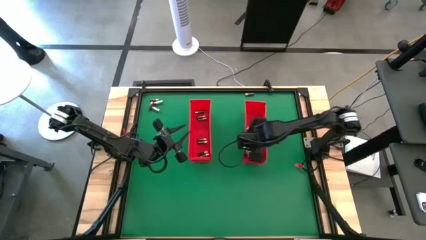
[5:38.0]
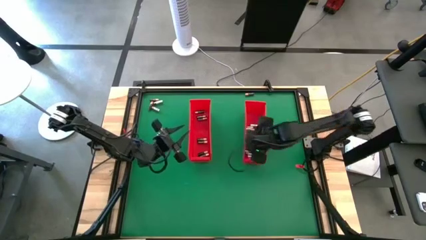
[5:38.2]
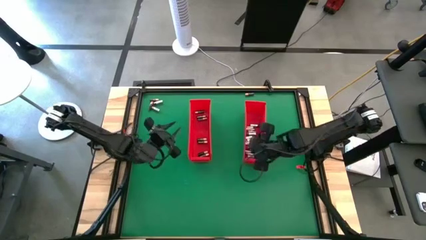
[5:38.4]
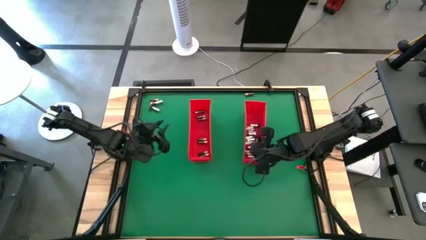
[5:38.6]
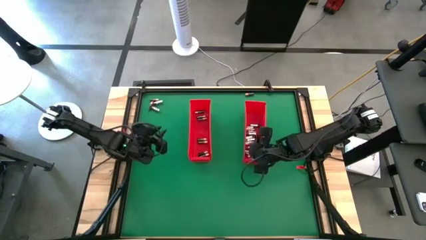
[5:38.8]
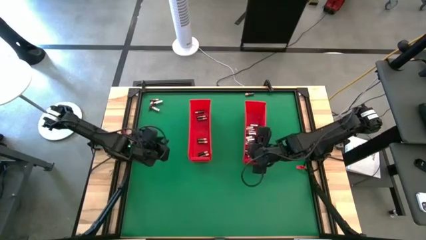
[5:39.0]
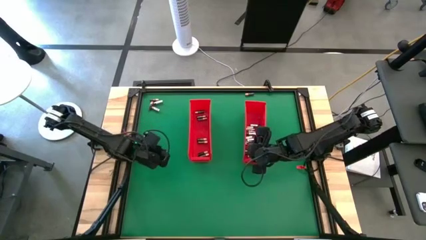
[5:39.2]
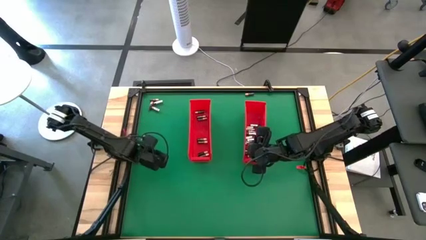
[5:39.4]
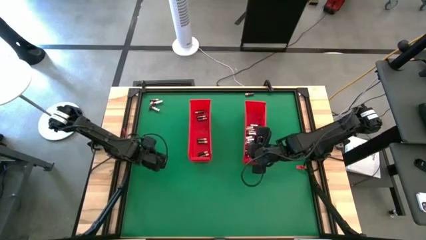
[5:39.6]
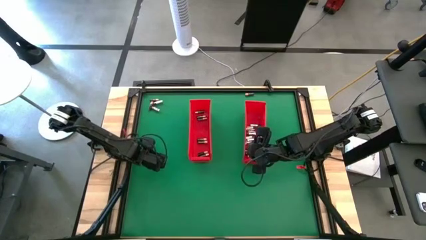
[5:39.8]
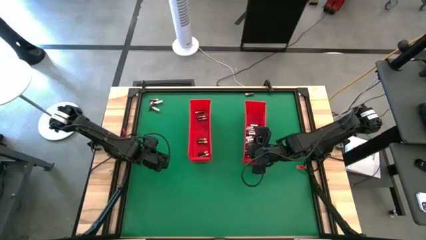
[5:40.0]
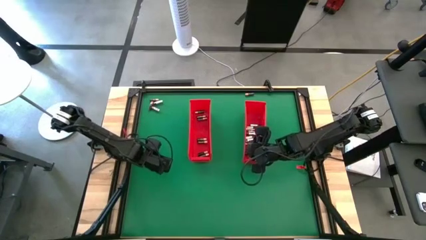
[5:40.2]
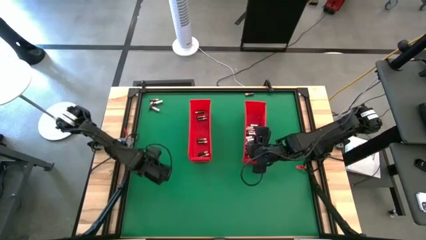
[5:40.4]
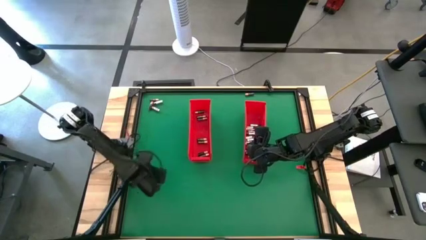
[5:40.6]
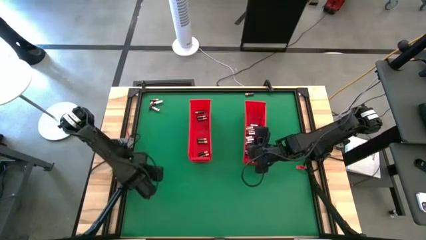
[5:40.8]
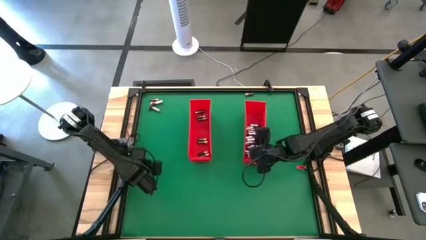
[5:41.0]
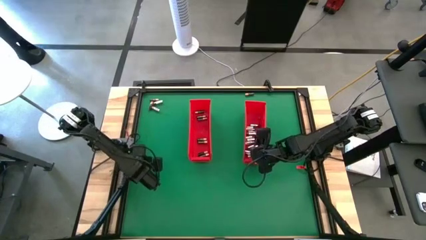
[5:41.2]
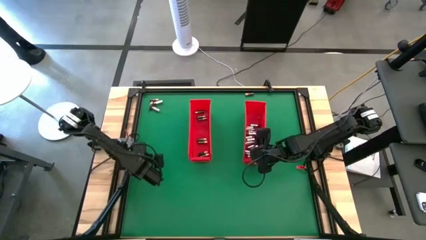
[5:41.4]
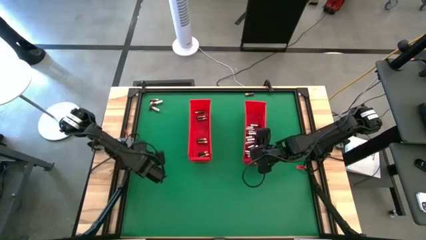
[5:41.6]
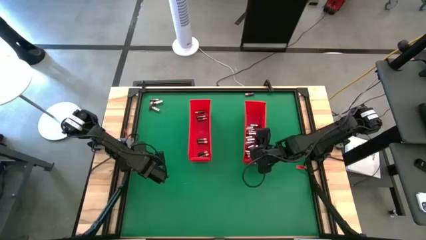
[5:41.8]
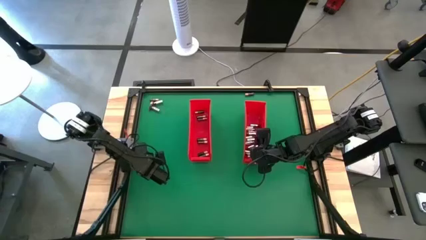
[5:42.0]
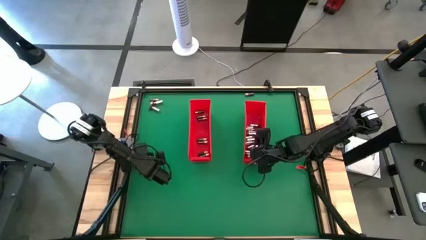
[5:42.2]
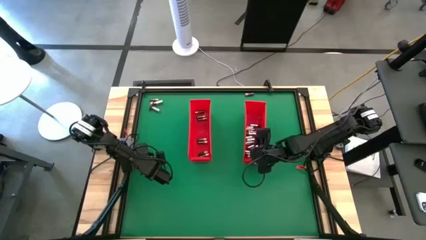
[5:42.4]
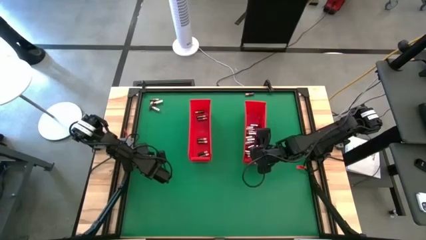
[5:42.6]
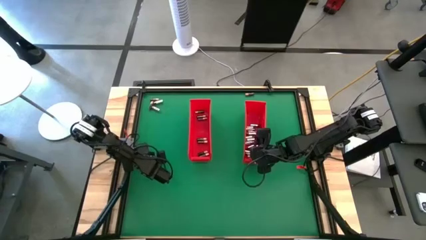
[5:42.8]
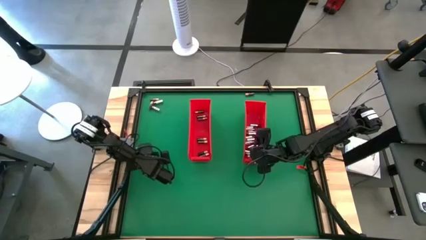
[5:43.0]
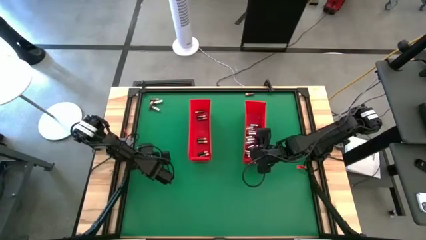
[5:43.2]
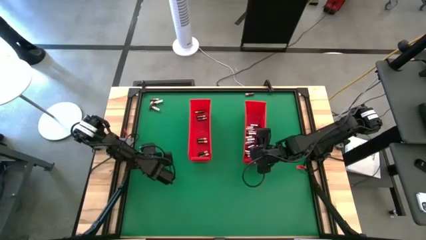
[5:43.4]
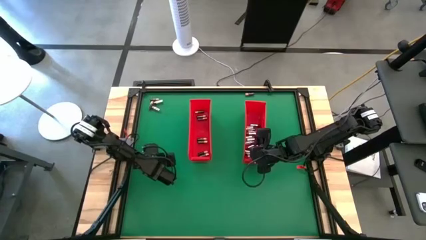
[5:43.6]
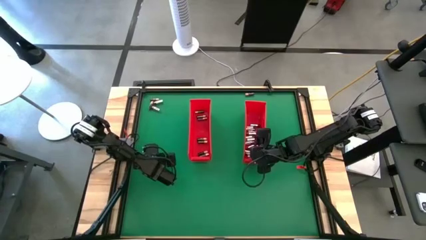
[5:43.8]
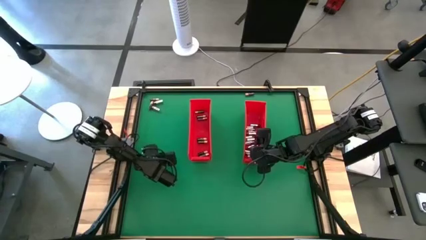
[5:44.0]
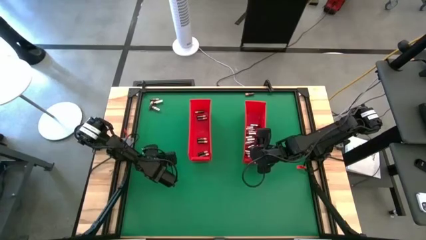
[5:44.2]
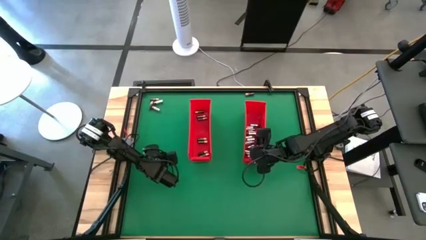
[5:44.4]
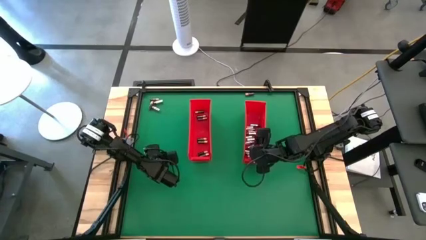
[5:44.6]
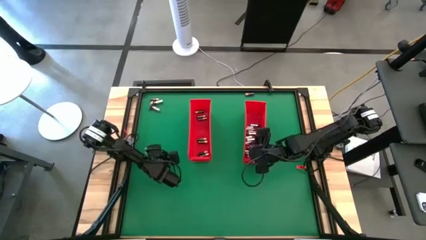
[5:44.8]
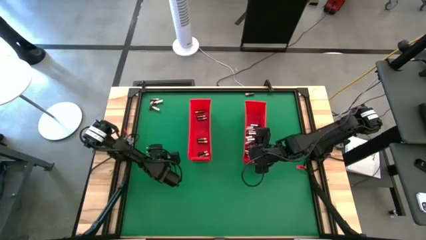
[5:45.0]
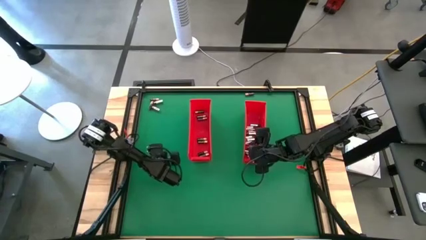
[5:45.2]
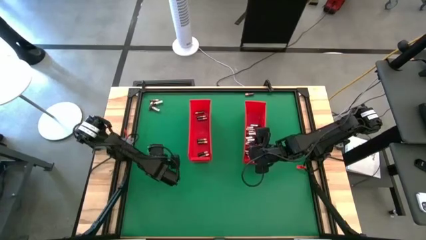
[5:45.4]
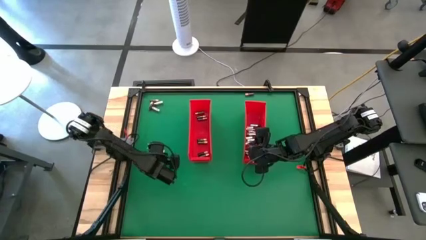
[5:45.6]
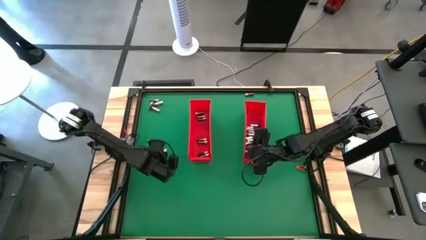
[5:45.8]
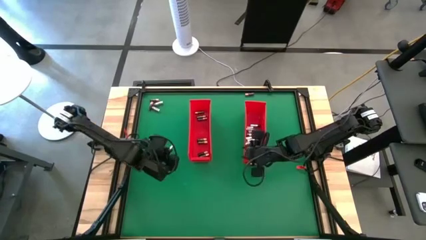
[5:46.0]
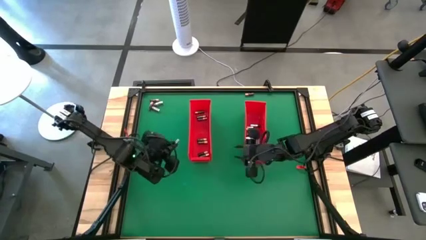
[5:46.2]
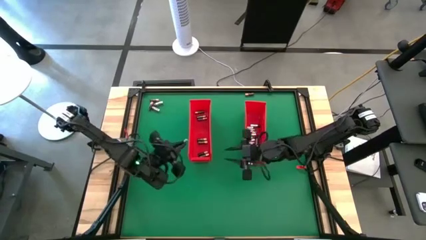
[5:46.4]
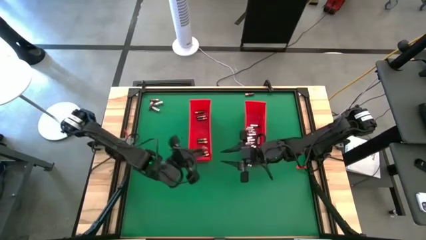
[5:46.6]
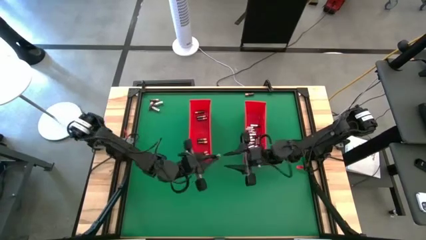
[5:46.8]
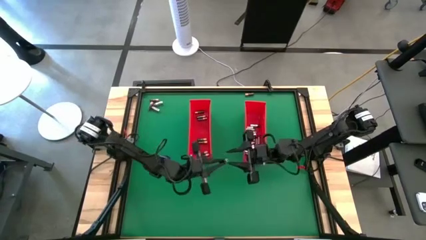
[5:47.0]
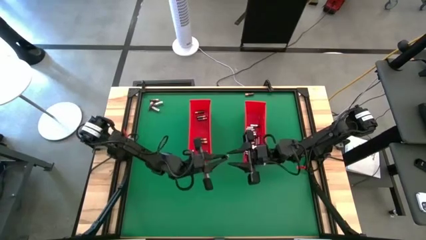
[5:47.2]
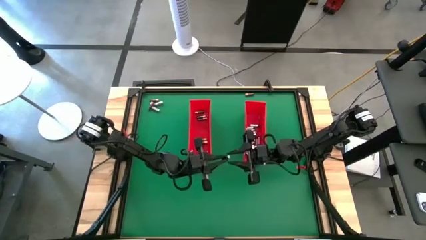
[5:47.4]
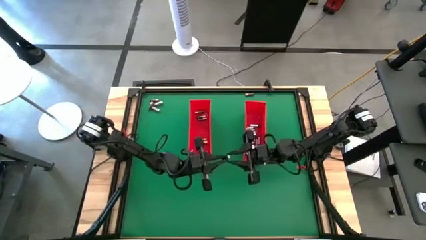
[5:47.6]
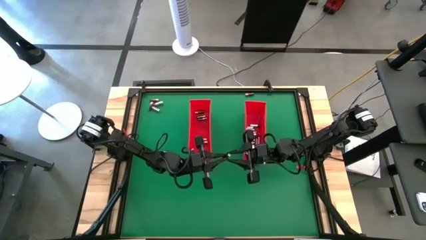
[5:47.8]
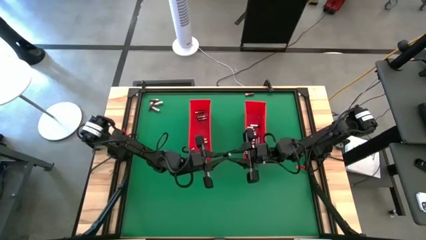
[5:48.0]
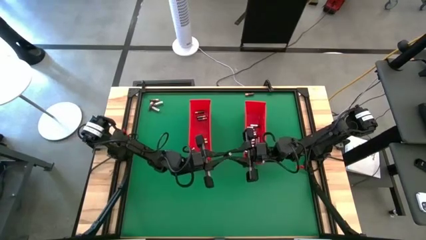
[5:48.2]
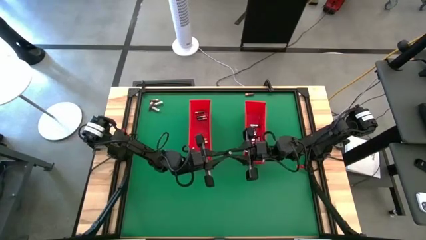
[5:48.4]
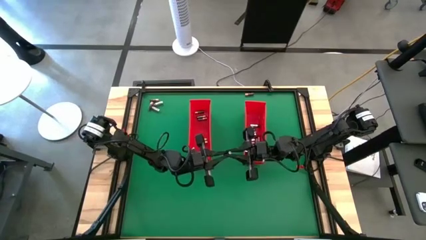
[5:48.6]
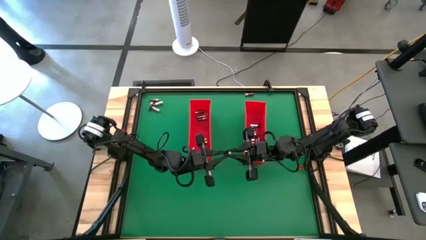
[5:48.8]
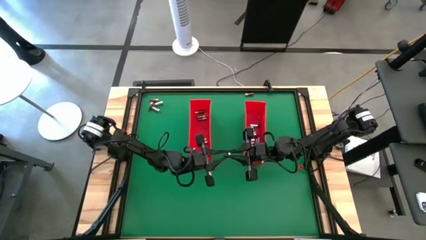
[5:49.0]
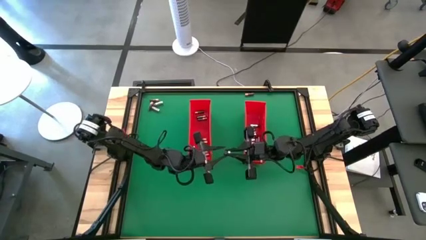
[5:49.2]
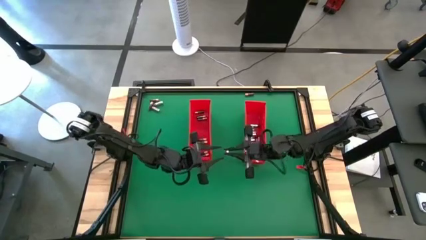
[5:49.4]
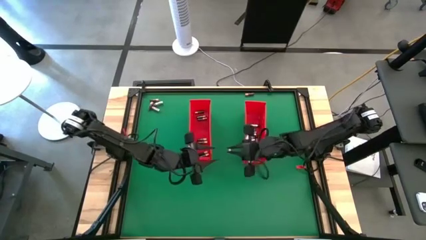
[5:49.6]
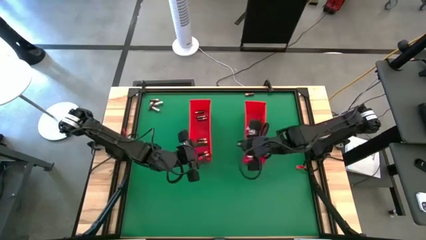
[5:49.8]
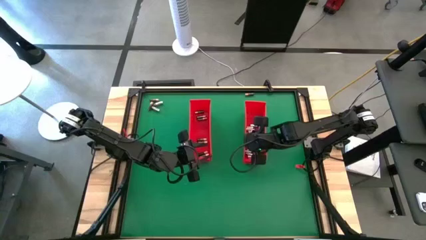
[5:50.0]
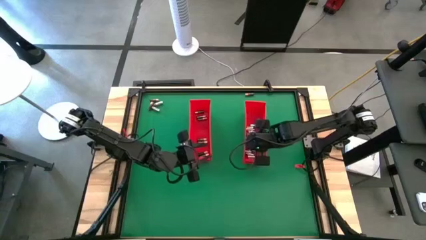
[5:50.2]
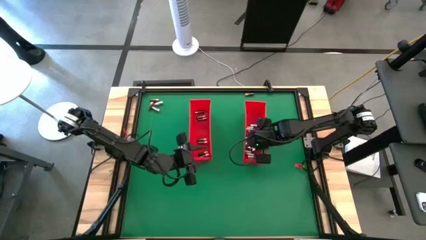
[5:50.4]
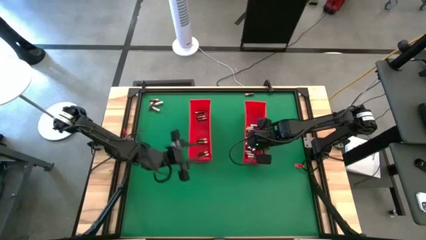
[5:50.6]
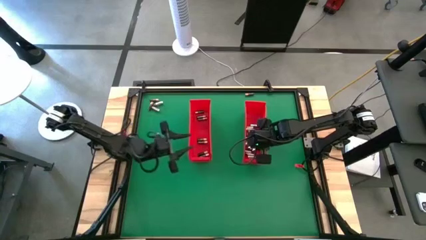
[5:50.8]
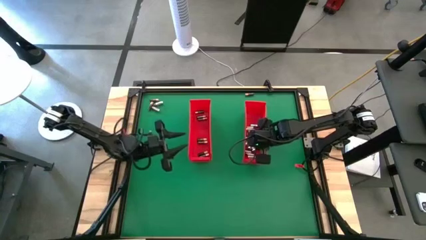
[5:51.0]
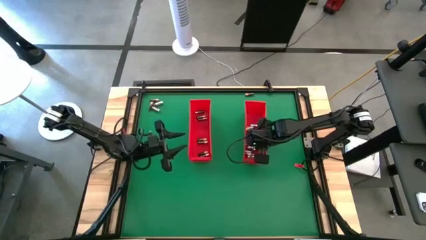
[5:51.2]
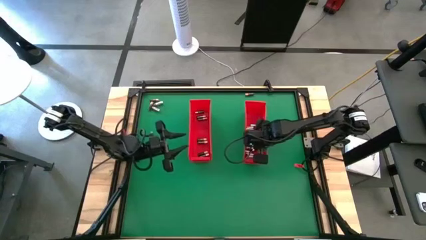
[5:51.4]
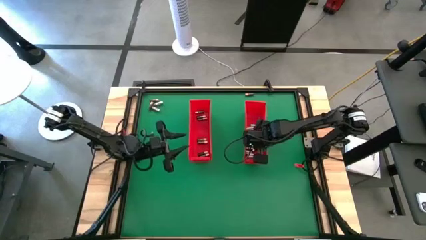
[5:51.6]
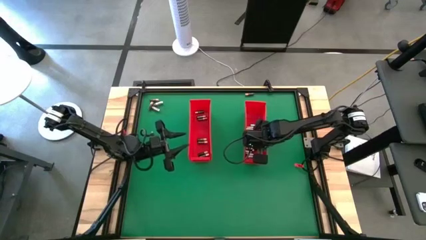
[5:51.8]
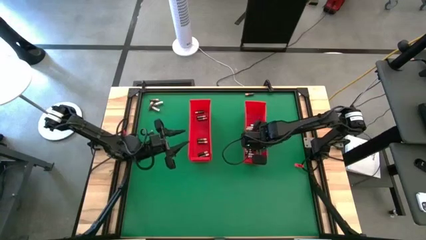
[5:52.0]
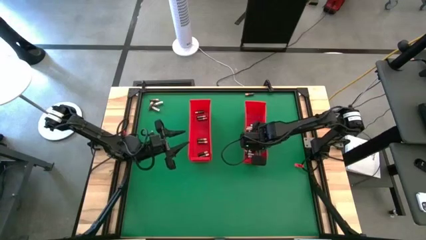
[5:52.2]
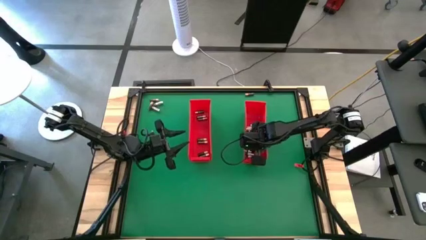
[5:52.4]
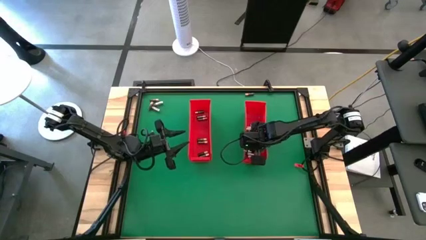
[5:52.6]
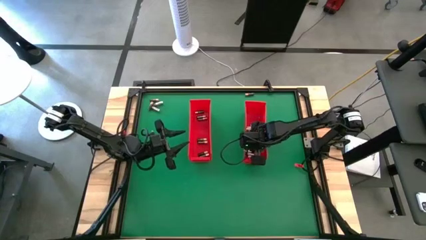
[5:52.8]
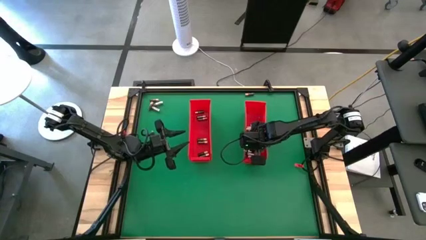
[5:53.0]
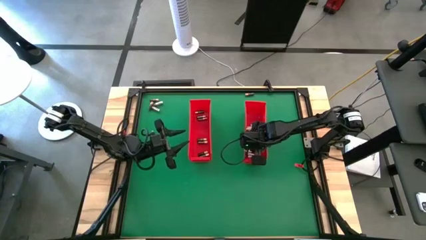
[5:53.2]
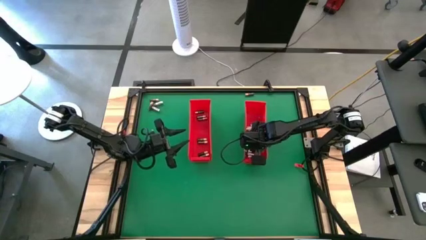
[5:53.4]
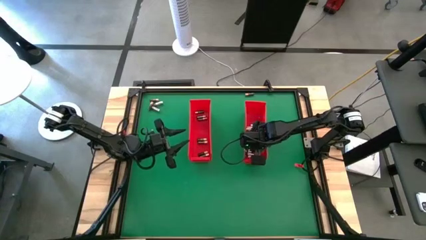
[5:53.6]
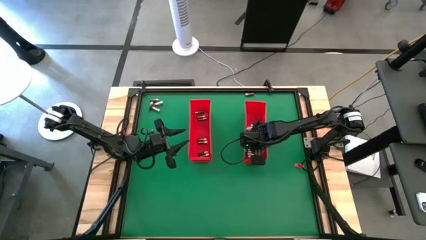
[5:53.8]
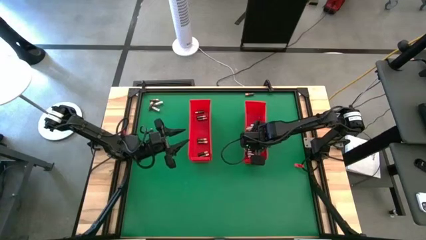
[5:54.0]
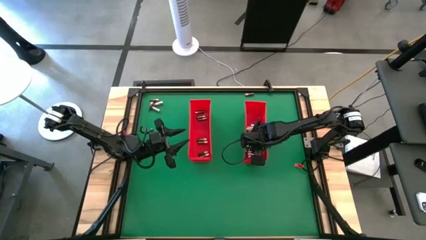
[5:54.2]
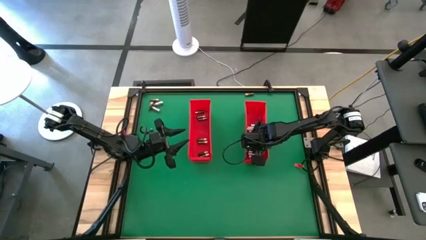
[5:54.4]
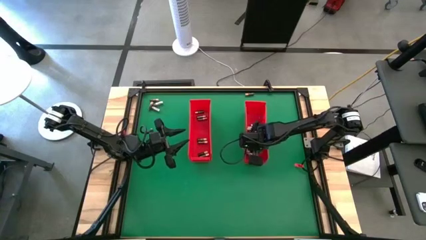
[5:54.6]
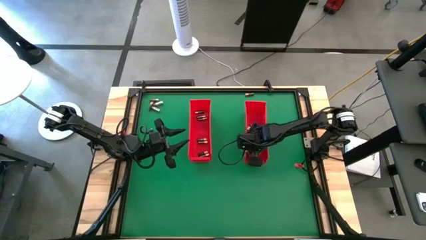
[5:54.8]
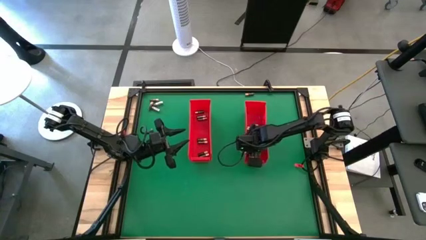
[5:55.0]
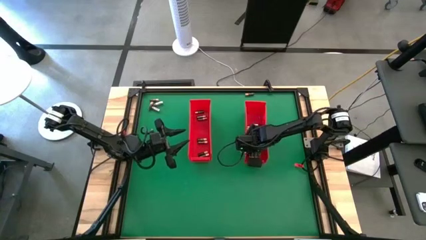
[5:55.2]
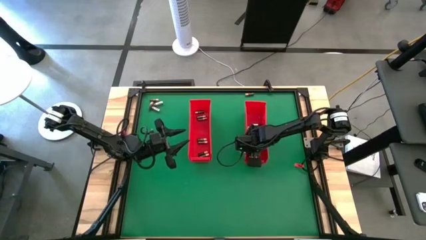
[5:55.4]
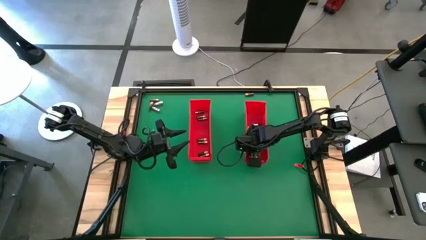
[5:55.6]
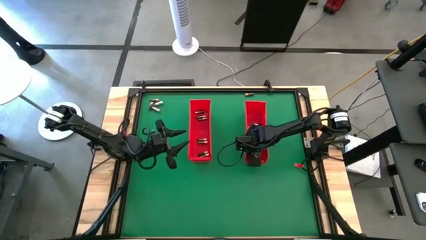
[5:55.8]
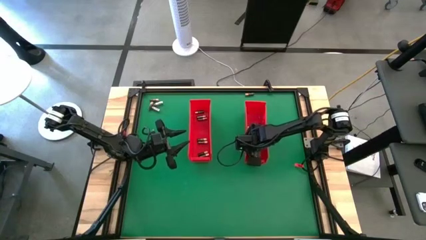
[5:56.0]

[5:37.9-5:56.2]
Task: Sort batteries
Put the silver battery into the right red bin
